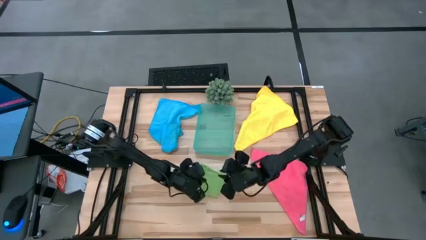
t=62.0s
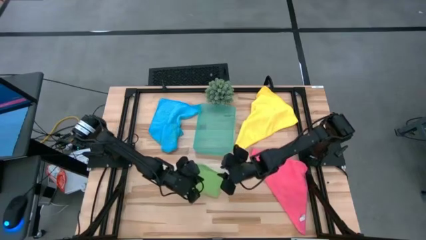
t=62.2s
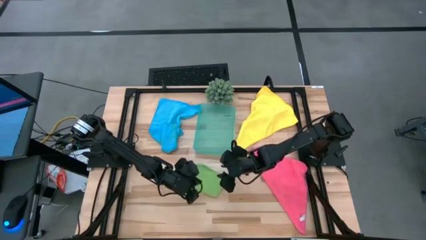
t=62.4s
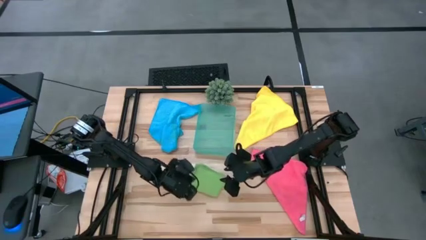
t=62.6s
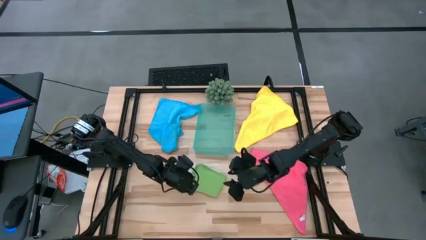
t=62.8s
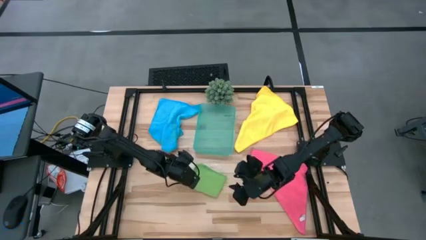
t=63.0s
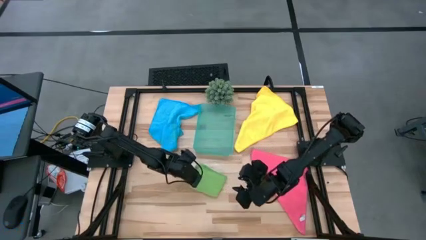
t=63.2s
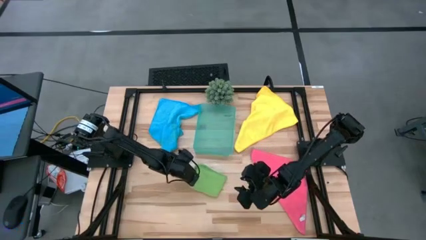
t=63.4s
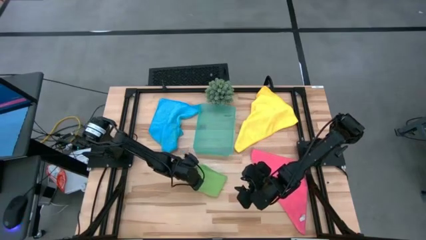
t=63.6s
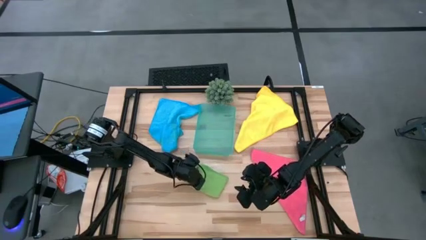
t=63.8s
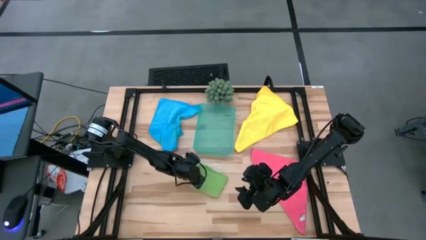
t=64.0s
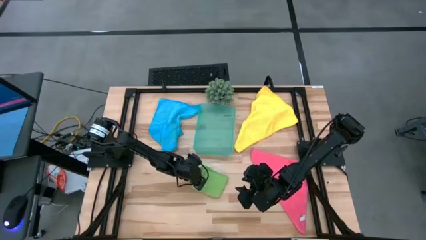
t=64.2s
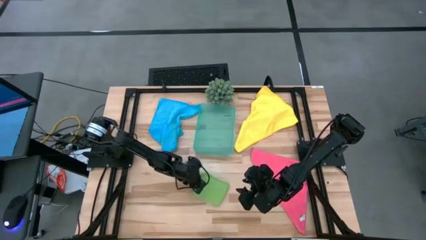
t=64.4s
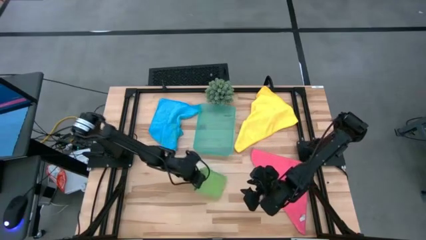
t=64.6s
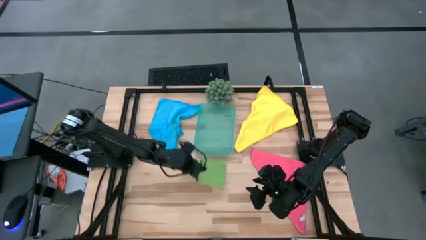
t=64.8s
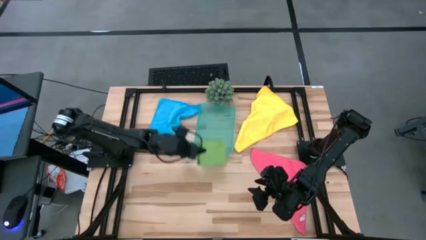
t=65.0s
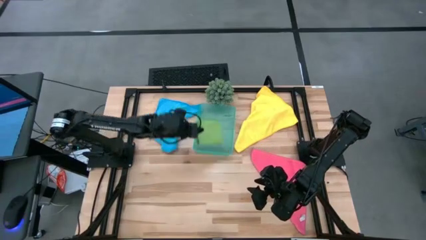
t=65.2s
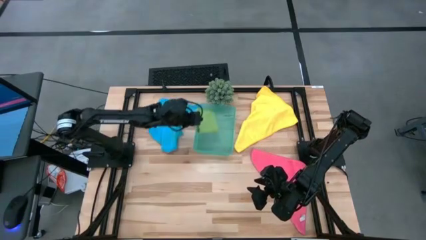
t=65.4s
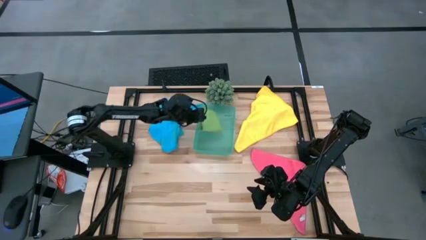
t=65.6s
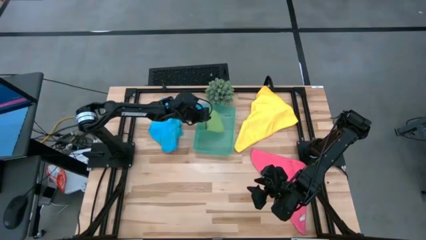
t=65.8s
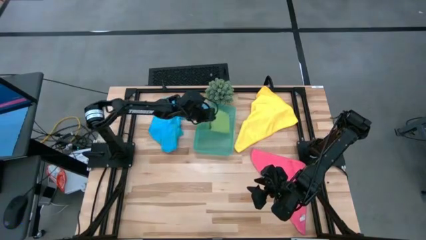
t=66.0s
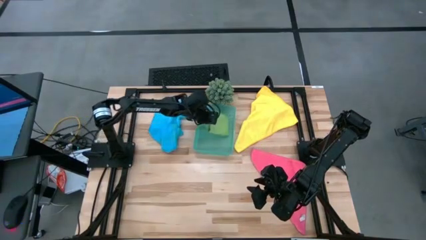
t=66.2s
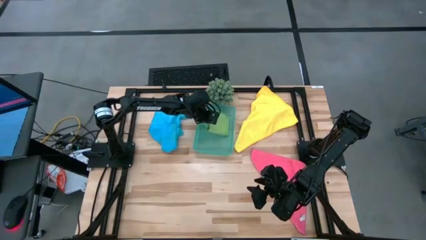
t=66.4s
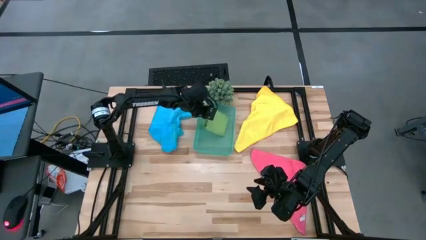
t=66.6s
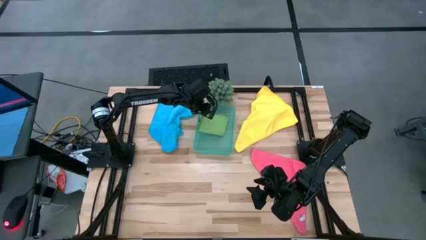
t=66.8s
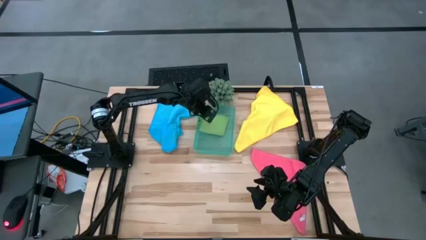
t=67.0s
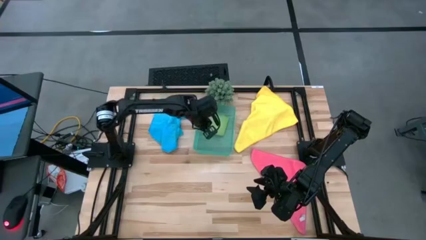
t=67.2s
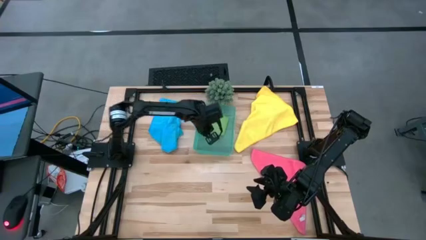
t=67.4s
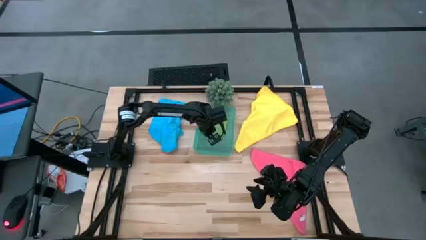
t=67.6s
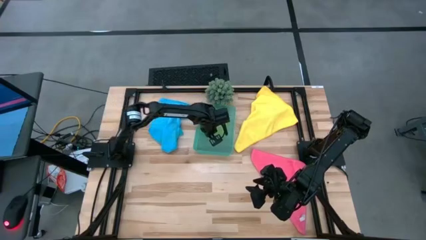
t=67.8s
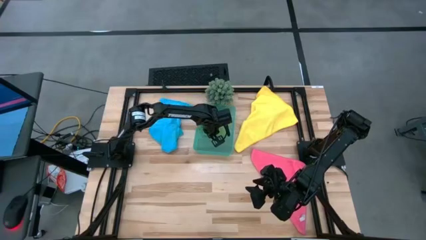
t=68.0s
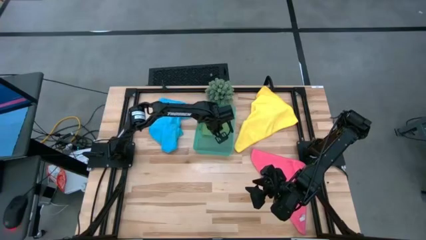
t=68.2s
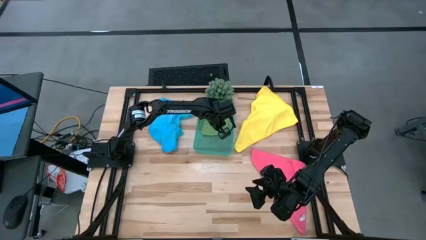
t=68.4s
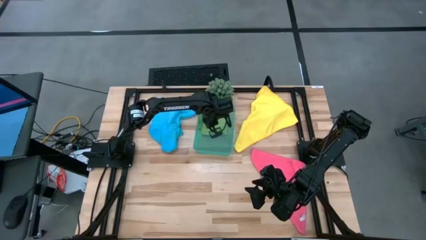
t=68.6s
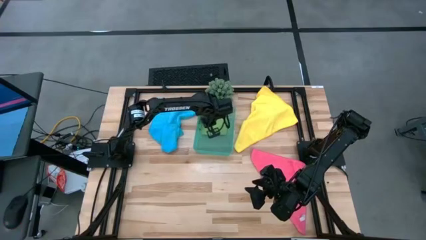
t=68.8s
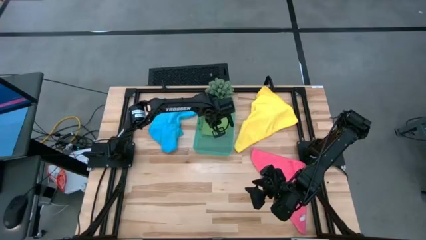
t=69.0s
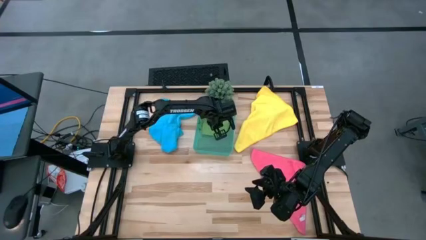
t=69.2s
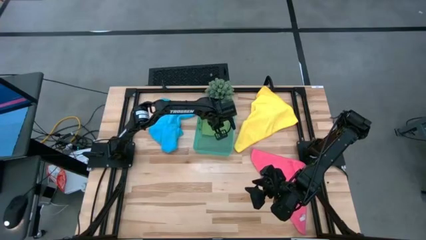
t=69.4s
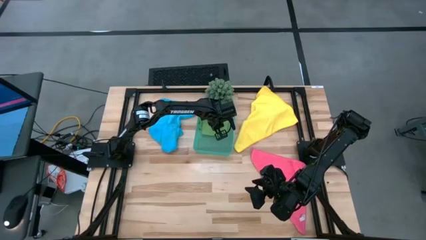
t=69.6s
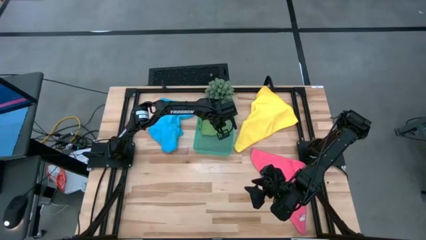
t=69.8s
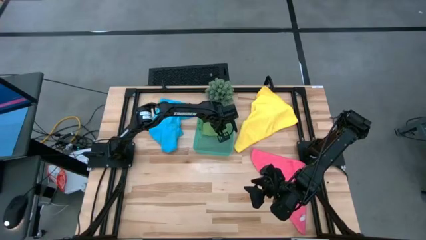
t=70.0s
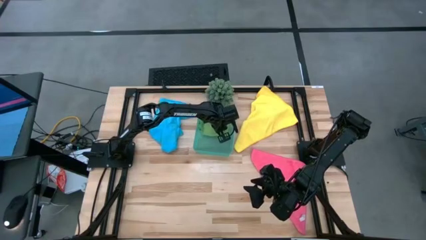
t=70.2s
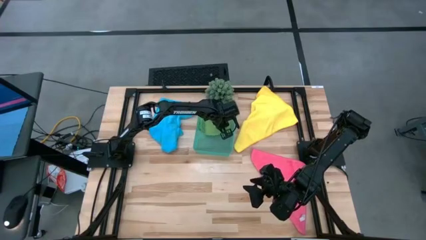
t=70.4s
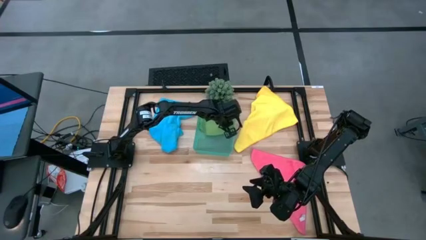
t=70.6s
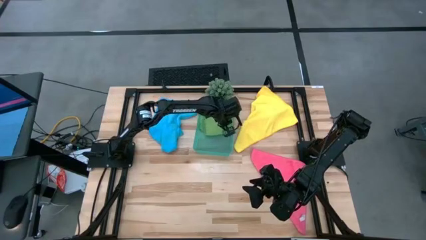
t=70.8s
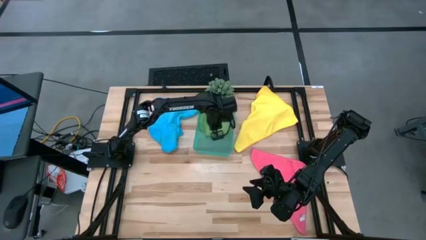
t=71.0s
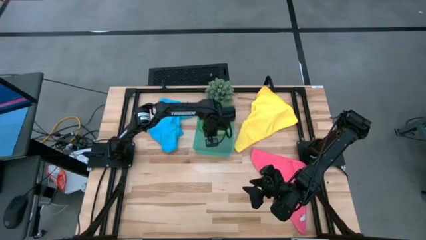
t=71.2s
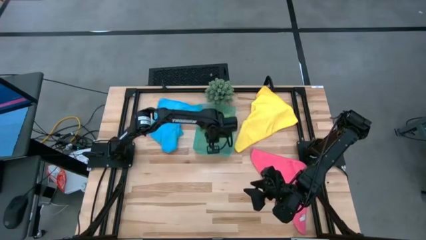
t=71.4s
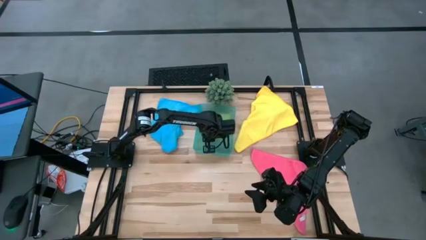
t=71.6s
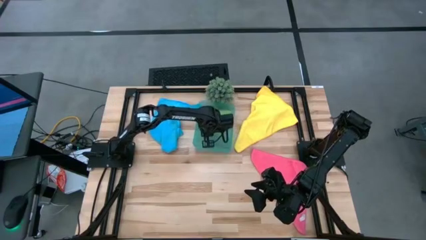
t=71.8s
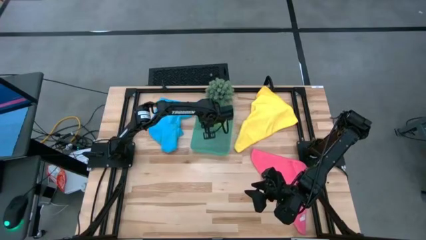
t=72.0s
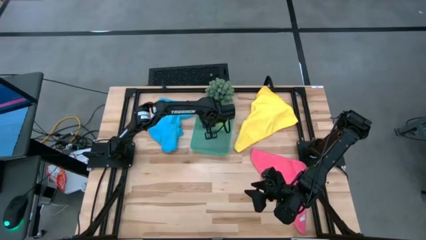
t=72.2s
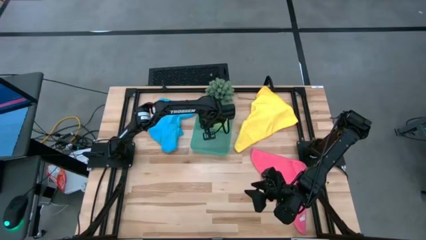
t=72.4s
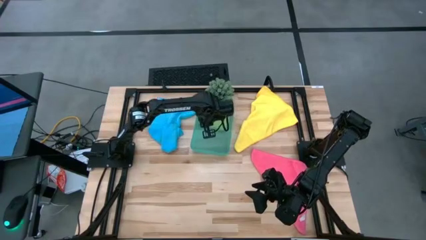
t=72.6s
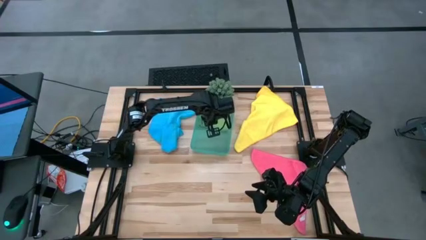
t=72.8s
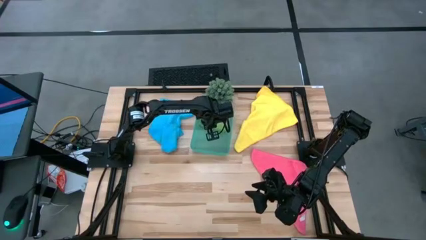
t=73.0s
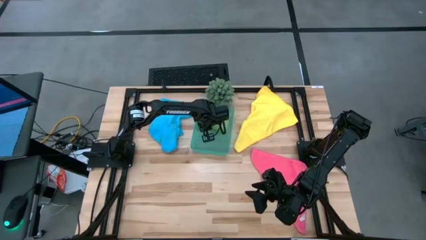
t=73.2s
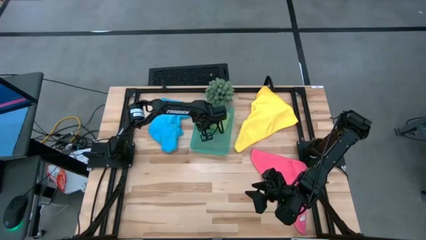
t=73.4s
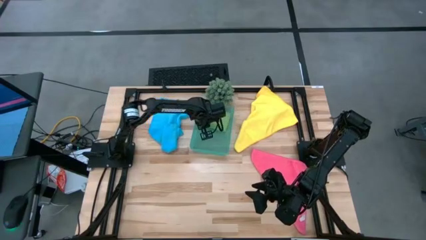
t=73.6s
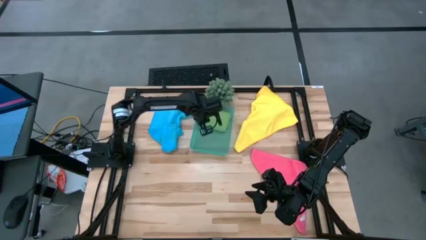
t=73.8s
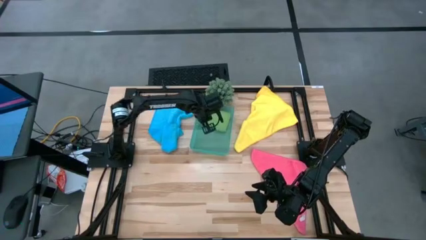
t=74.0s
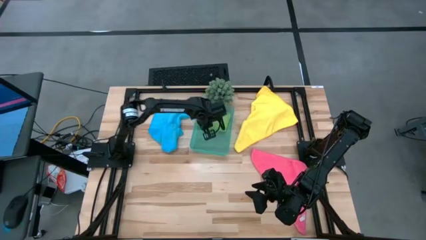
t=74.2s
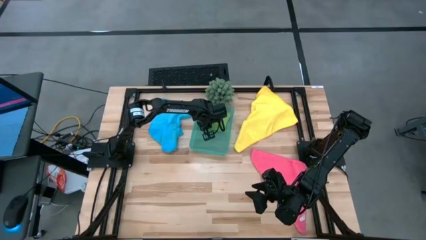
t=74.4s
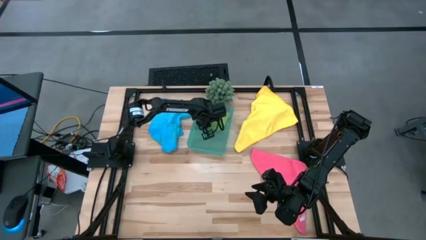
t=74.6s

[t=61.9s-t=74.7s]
Task: Fold microfiber towels
Put the green micro fiber cloth into the green bin

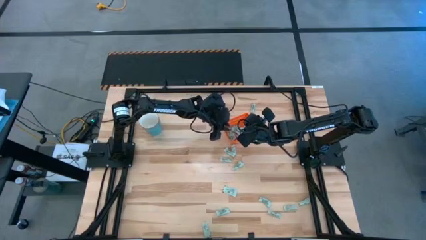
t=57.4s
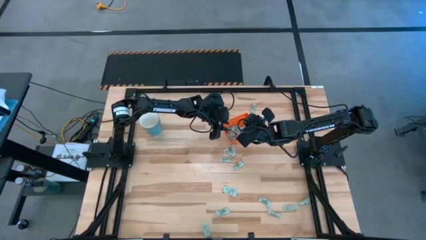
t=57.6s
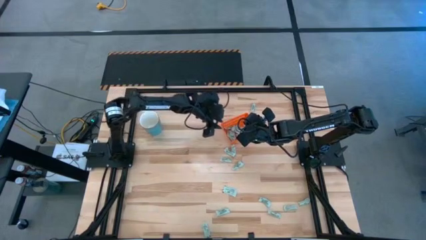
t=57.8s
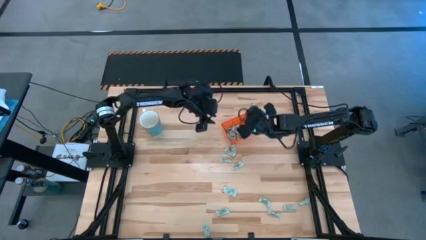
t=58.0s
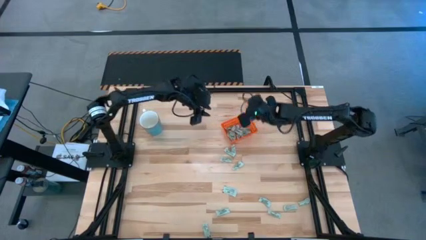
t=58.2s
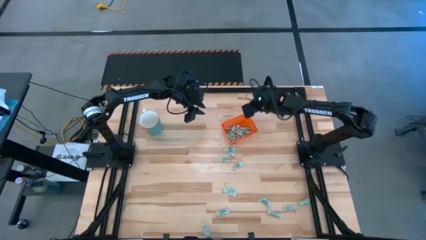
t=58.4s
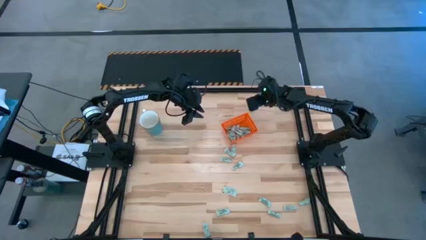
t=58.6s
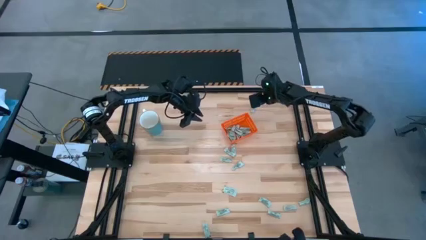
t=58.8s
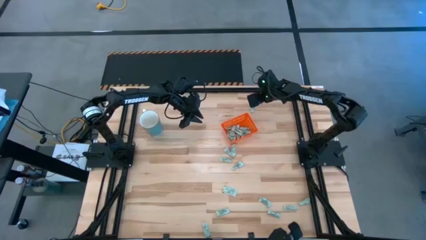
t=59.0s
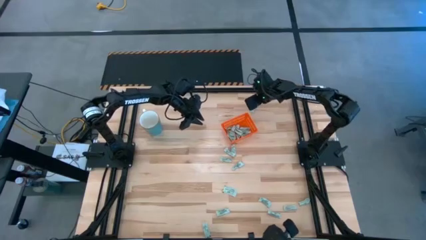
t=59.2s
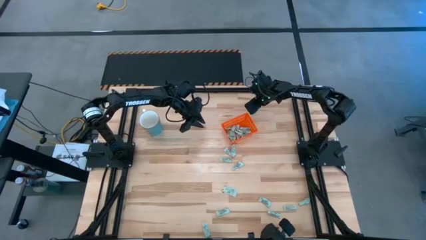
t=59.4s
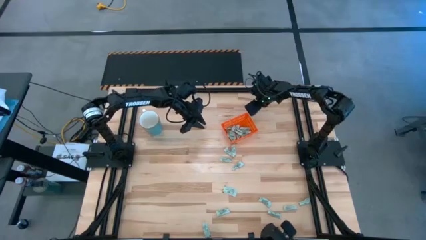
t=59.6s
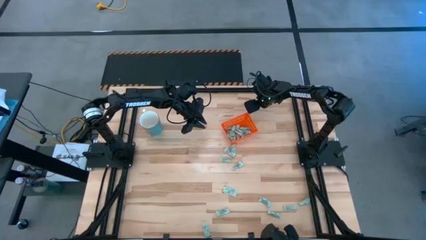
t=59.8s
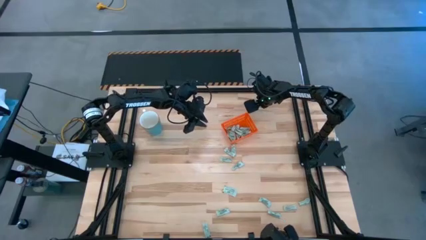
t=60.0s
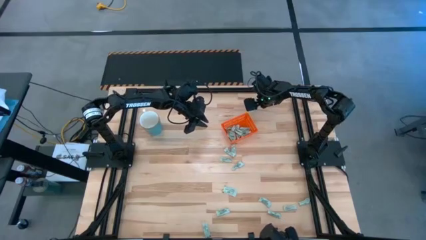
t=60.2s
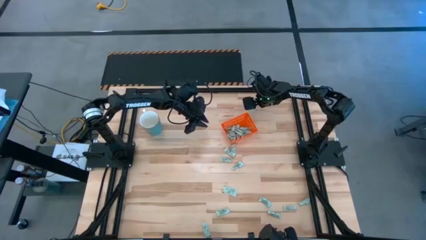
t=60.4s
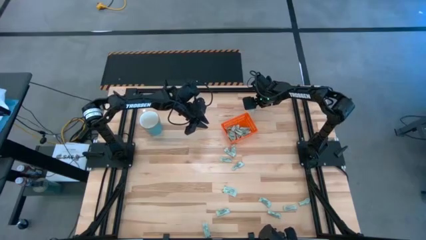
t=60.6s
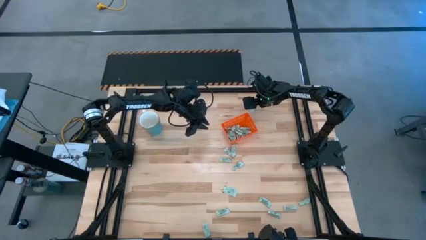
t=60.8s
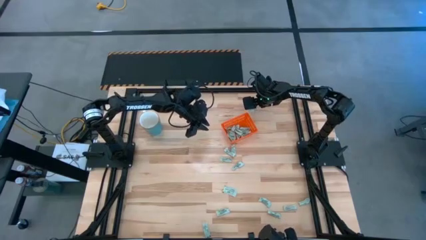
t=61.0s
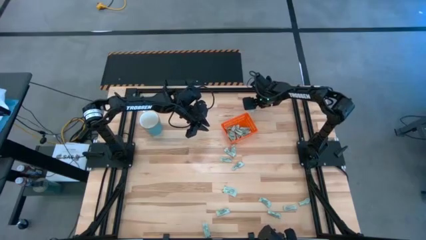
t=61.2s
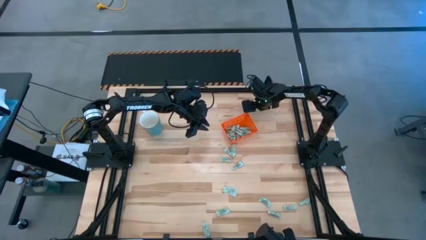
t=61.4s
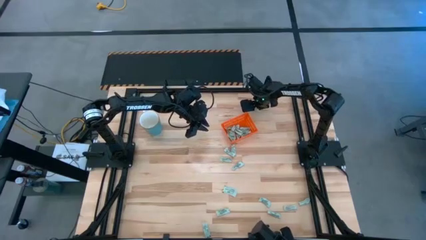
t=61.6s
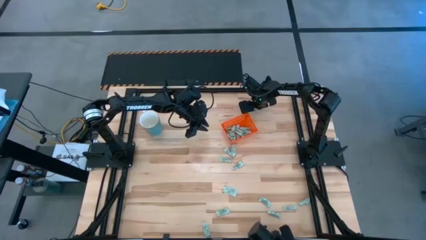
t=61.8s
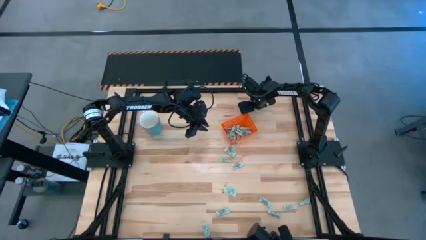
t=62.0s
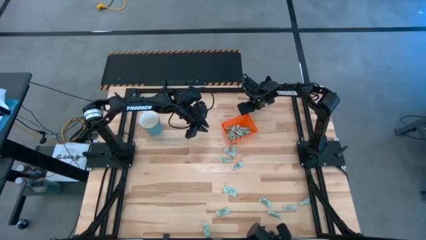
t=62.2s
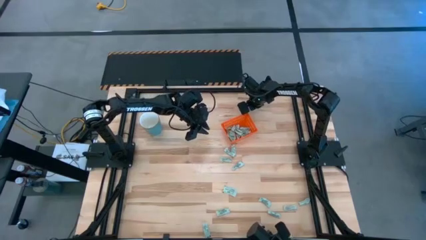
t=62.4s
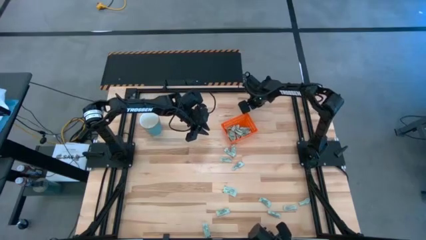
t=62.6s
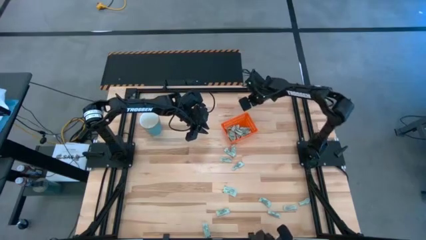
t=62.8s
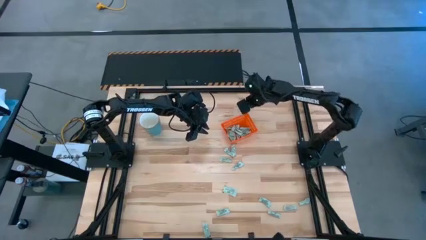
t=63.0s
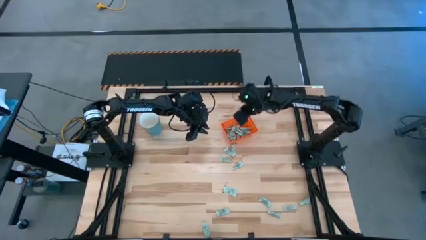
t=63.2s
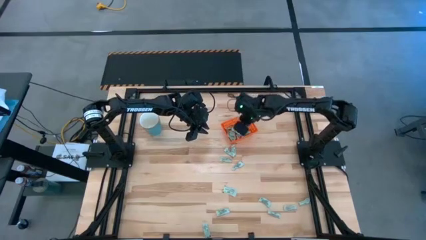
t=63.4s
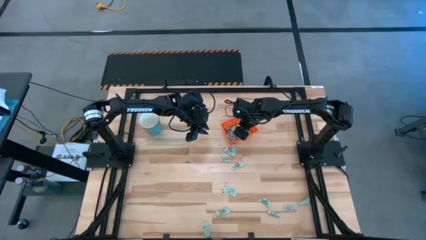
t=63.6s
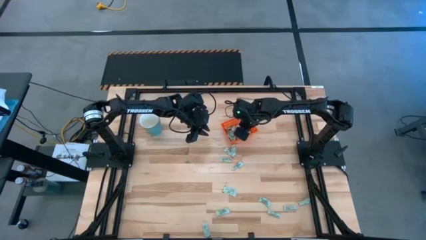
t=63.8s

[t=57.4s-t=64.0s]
Task: Pick and place Stevia / Truvia into bins
Put the stevia packet into the orange bin
